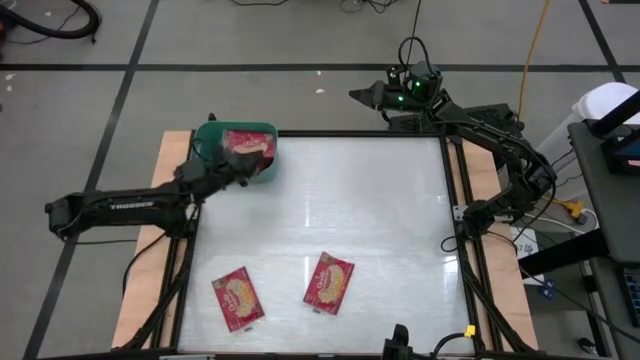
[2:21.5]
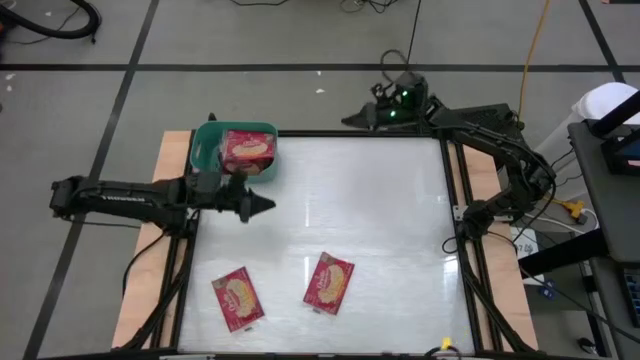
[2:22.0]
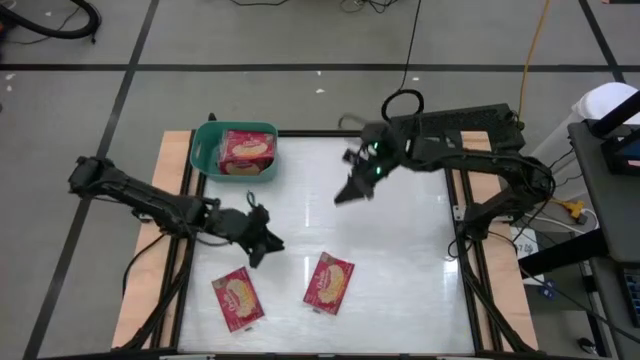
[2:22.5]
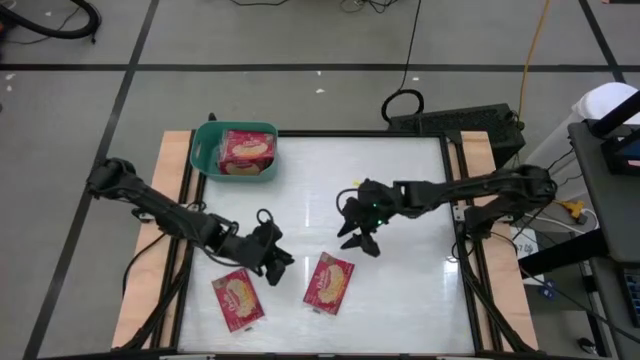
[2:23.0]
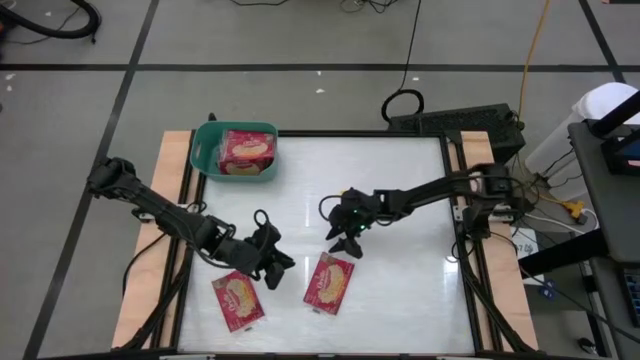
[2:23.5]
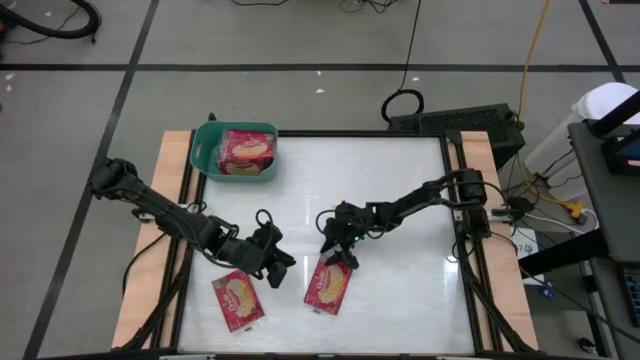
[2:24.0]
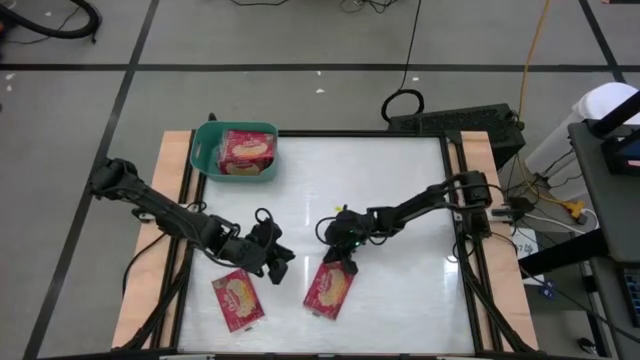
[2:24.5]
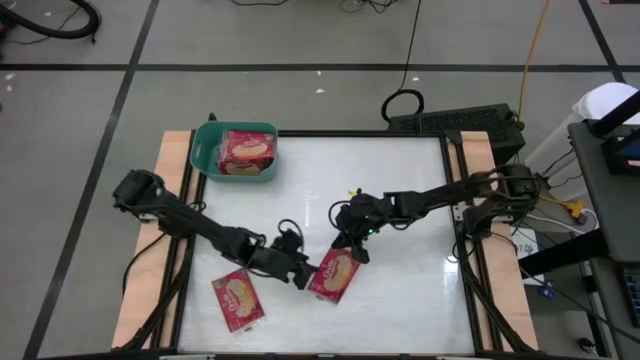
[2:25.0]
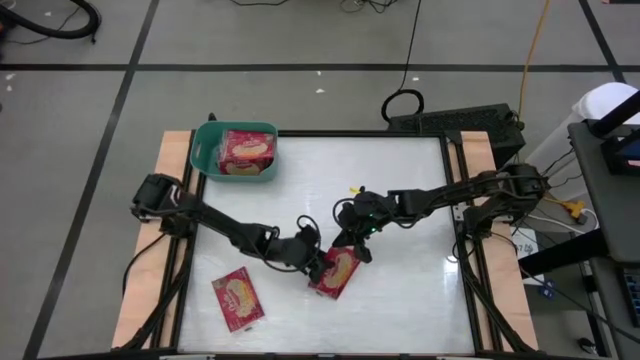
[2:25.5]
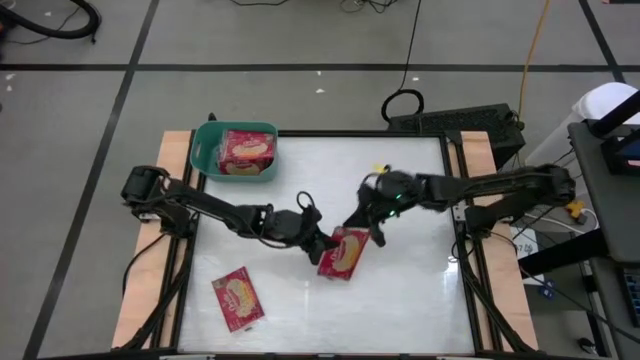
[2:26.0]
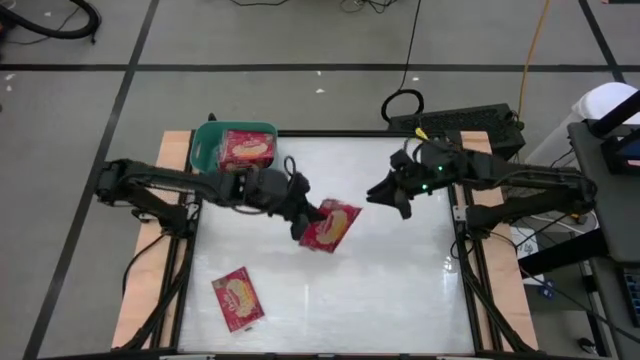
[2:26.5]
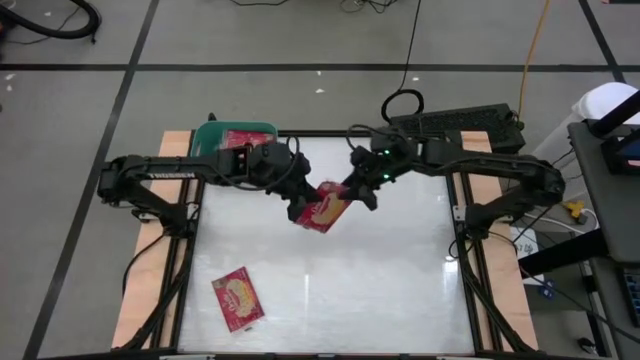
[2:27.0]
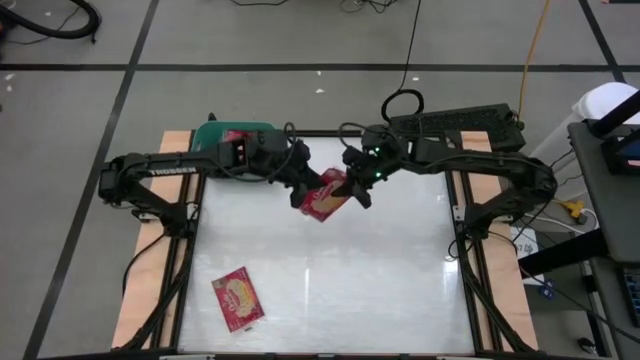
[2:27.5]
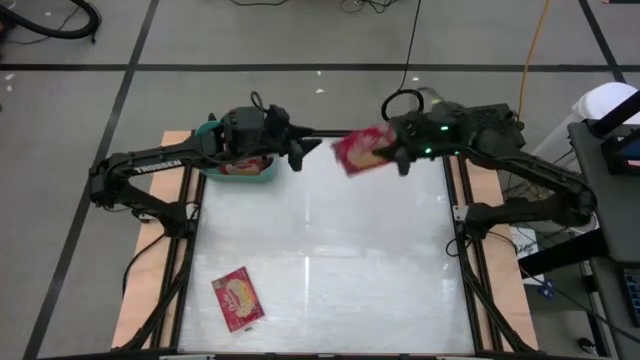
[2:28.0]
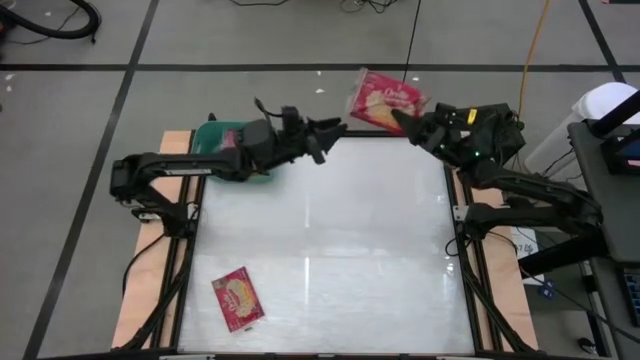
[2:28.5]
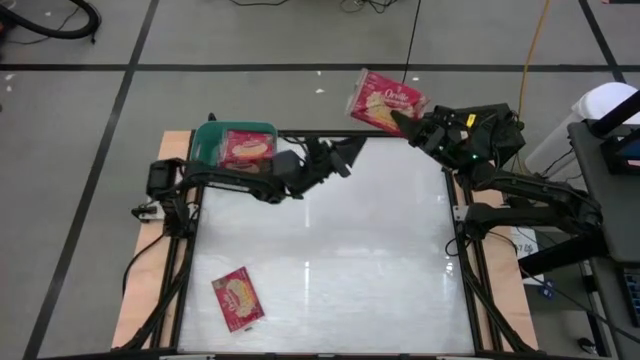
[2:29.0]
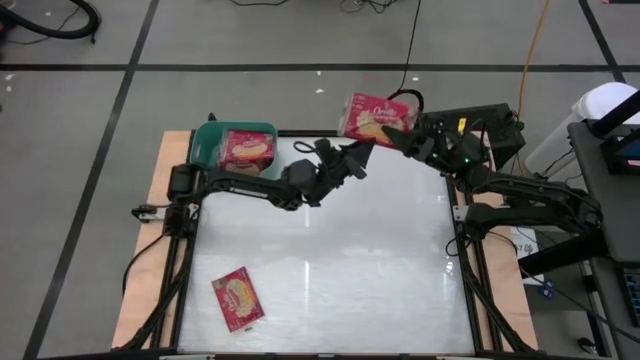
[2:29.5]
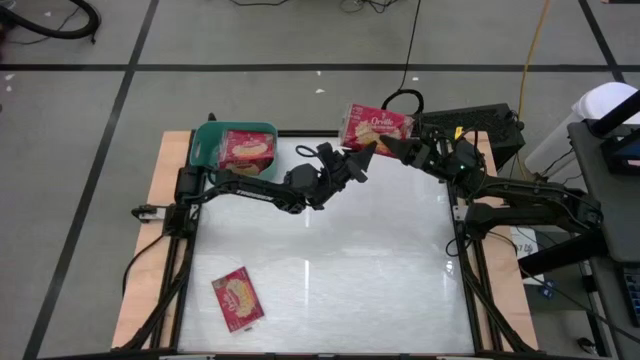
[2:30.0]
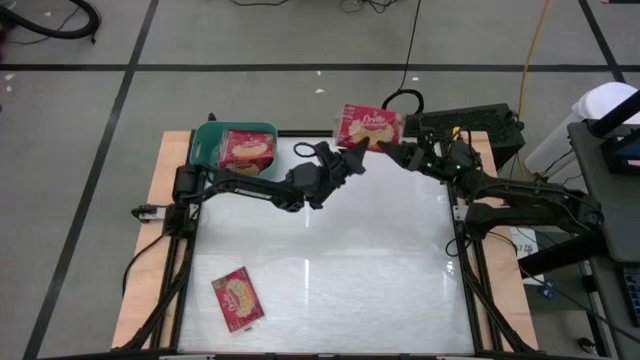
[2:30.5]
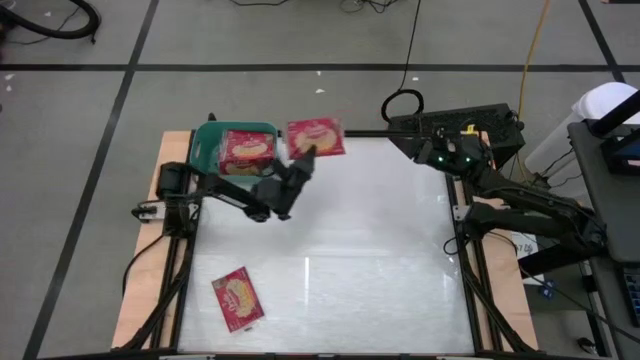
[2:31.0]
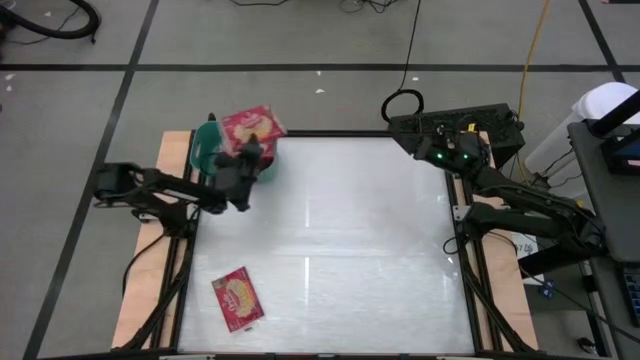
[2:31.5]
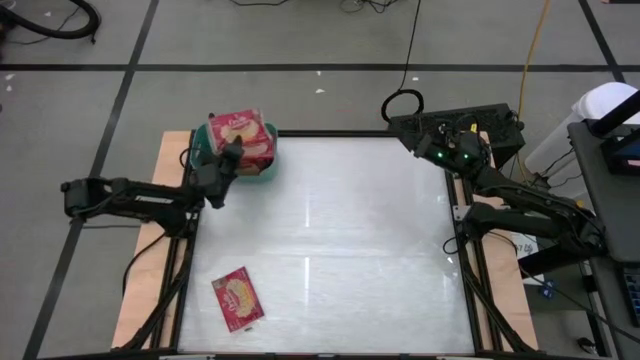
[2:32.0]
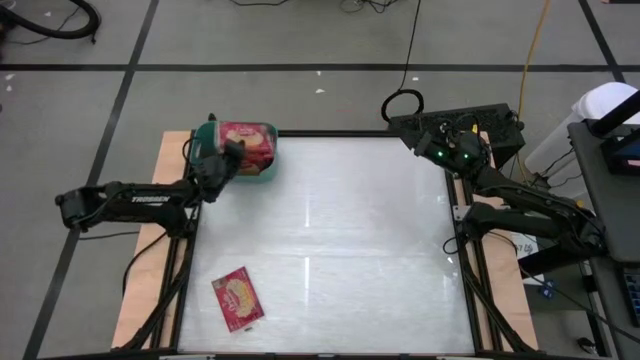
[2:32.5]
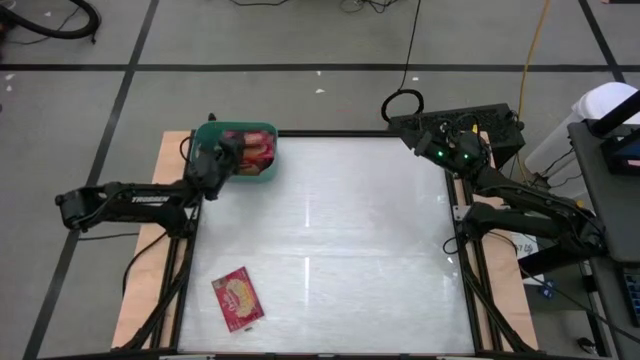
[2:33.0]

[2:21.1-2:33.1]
Task: Sort popcorn bags into baskets
Put the red popcorn bag into the green bin

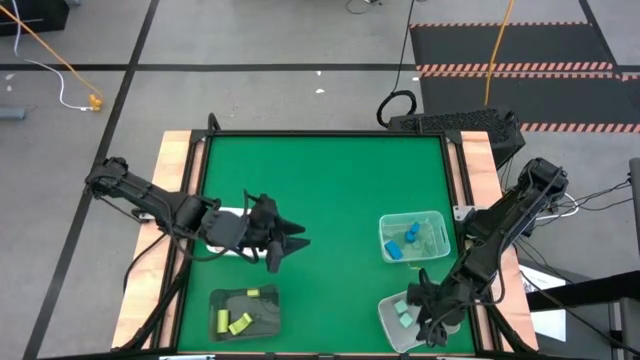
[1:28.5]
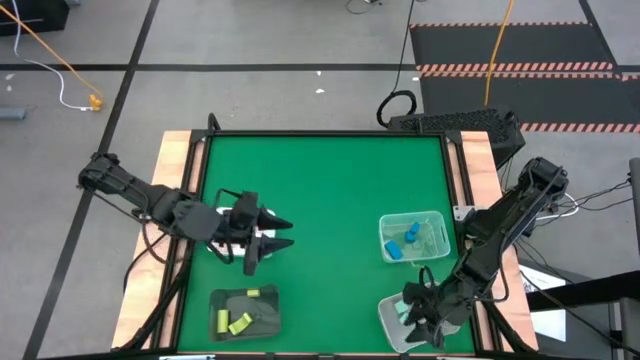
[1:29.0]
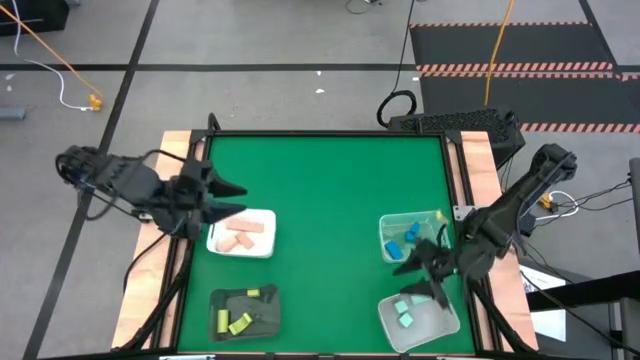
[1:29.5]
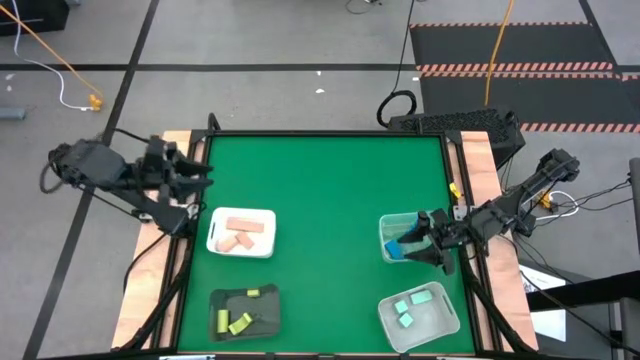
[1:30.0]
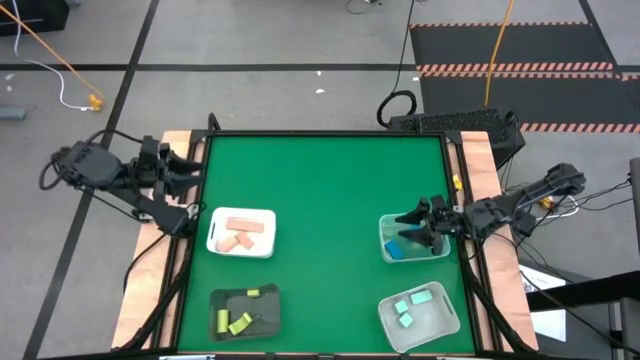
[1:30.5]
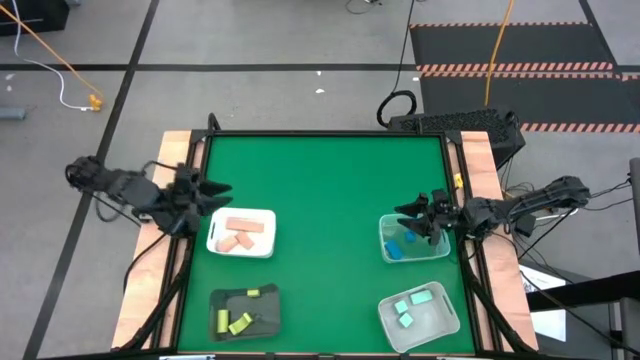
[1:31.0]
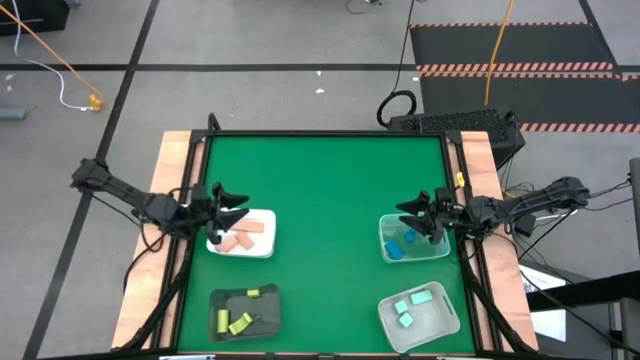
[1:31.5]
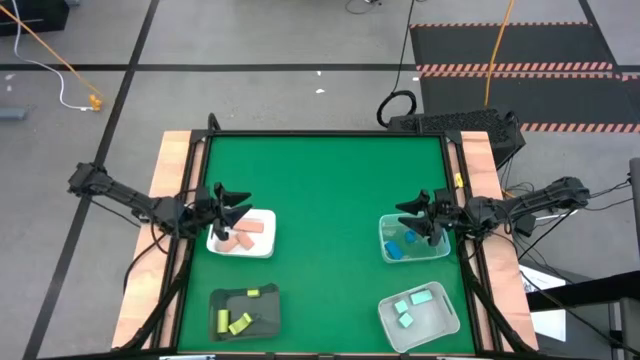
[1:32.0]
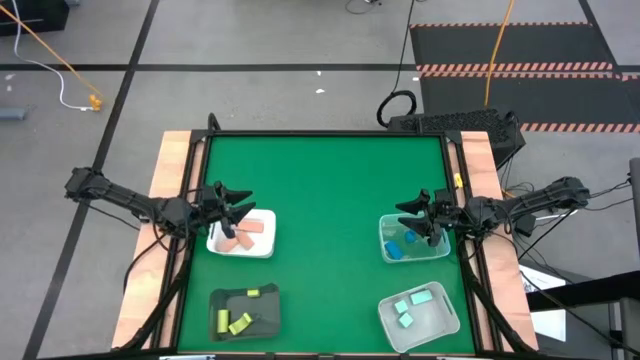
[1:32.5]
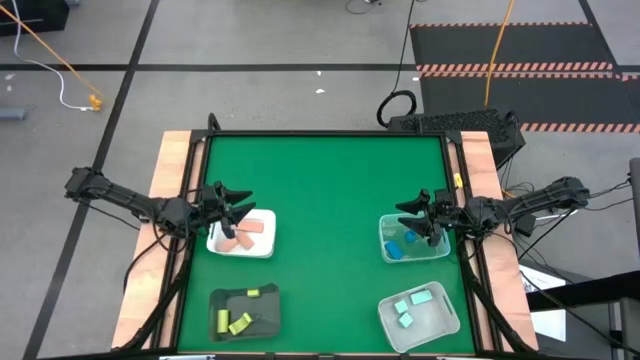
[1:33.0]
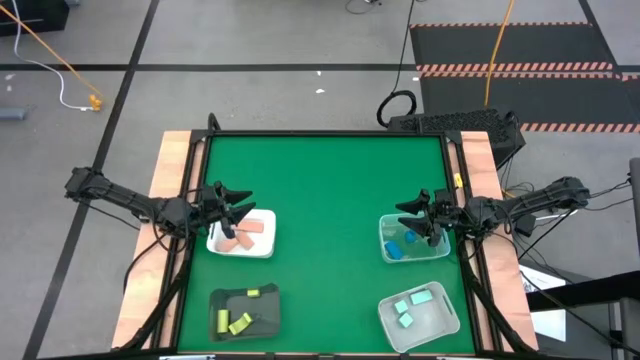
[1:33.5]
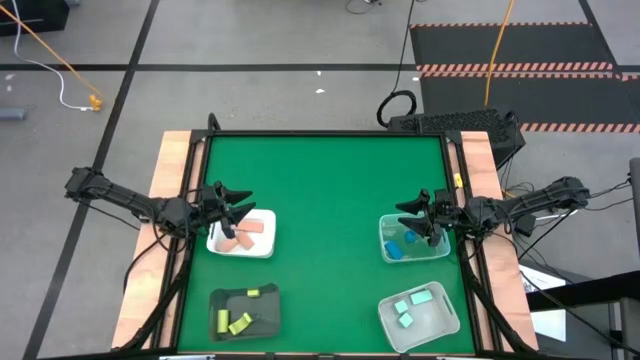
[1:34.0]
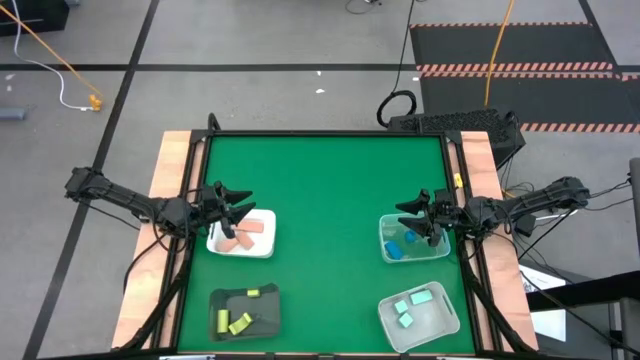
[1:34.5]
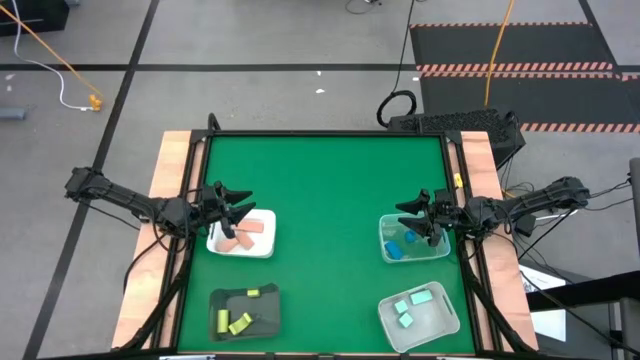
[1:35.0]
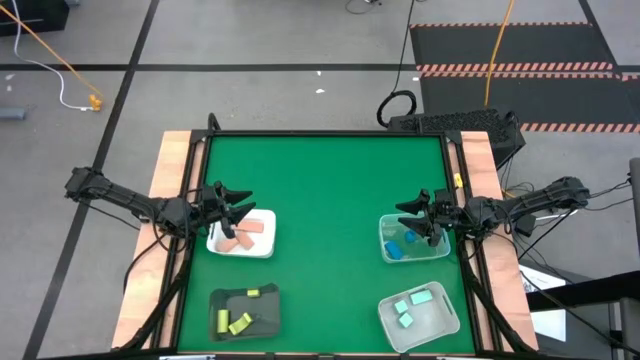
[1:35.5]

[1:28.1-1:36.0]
Task: Sort & place blocks by color
Return to Home Position

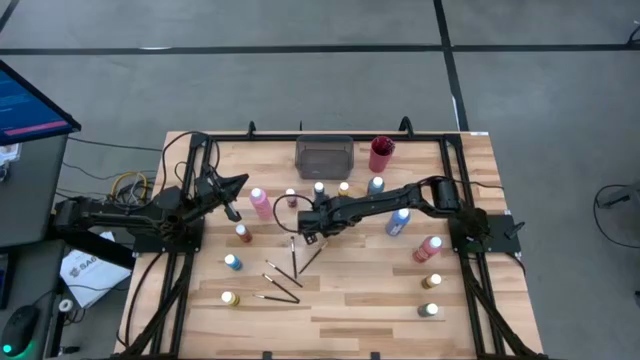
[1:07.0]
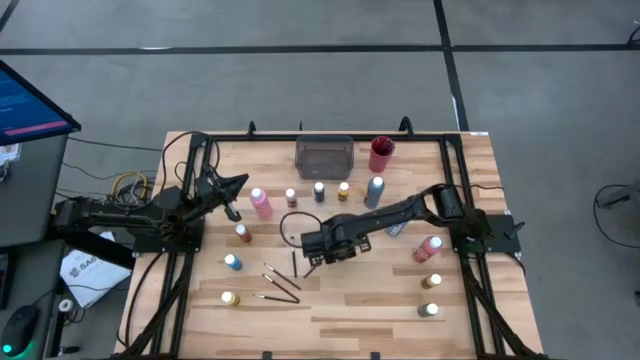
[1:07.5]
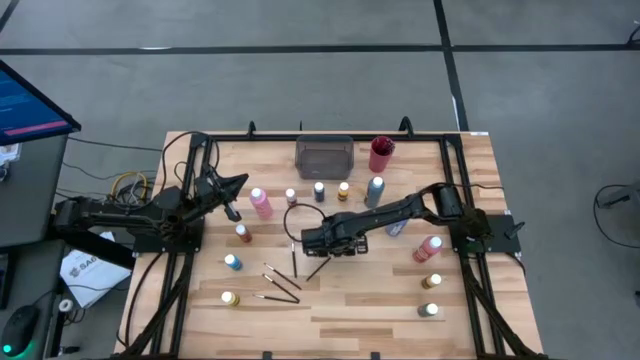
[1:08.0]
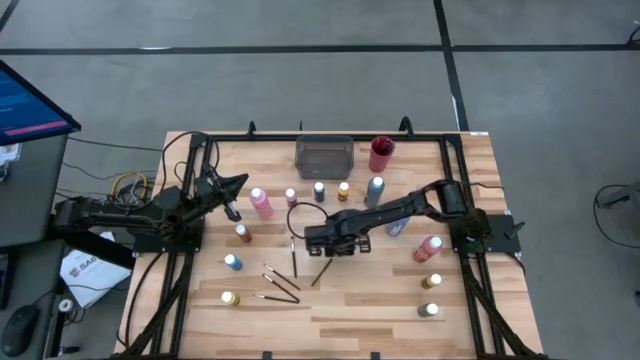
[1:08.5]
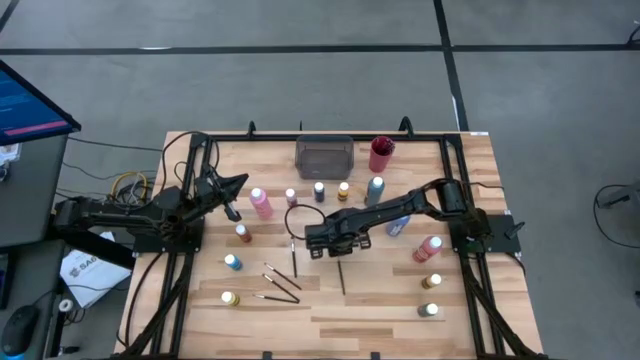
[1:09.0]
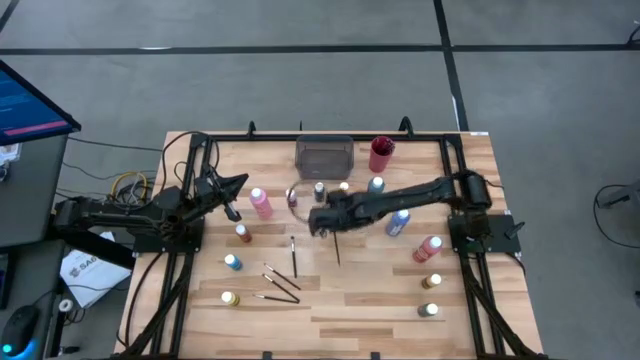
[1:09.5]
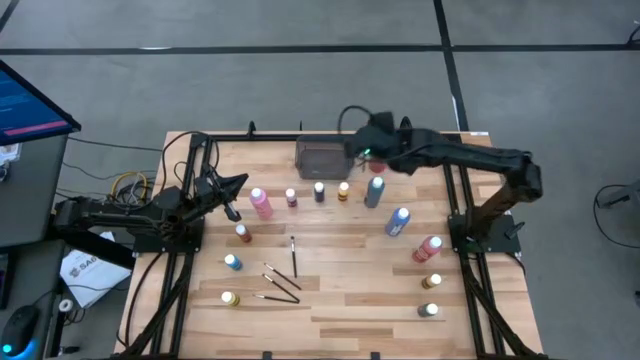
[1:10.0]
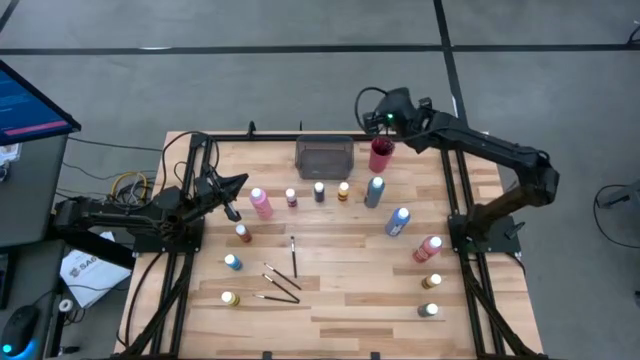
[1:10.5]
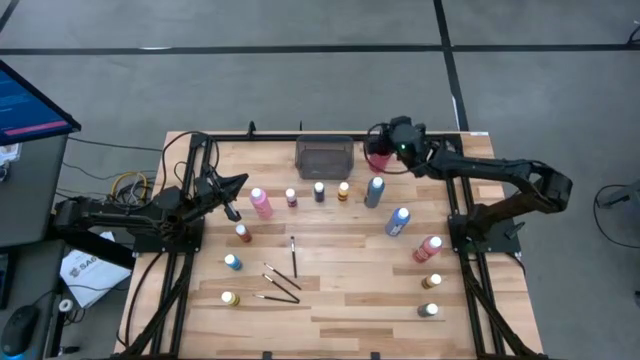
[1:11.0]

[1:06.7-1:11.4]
Task: Pick & Place Paint Supplies
Put the black paintbrush into the red cup
